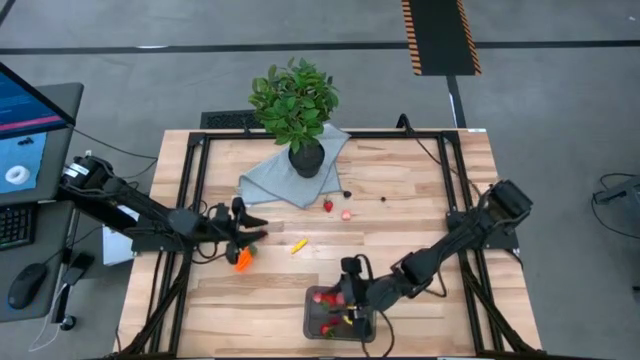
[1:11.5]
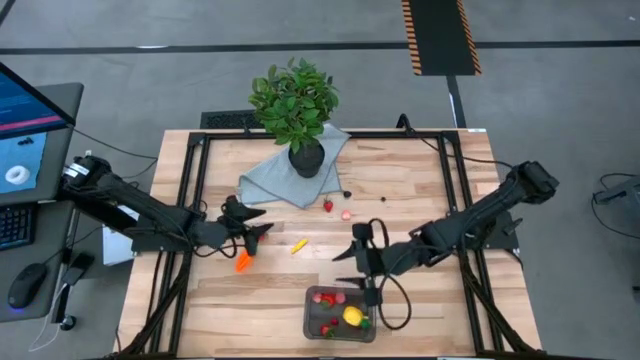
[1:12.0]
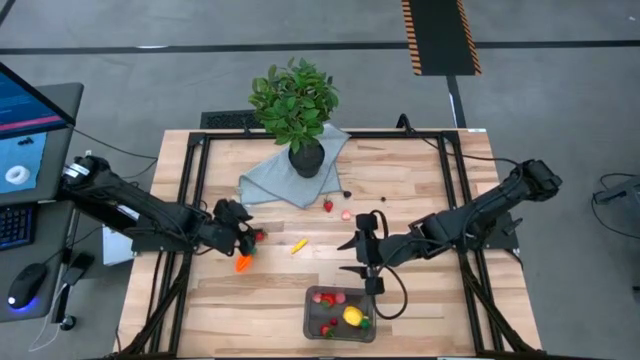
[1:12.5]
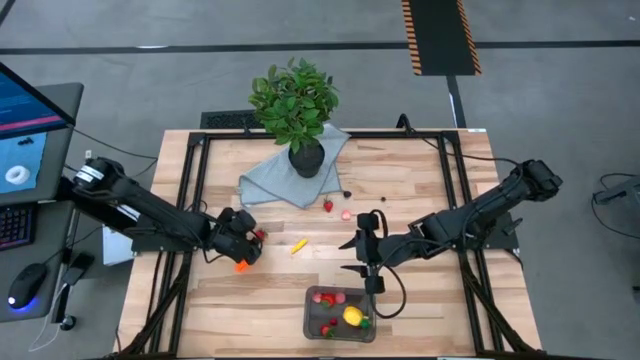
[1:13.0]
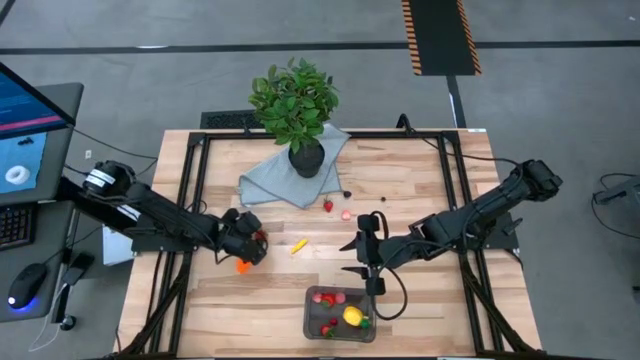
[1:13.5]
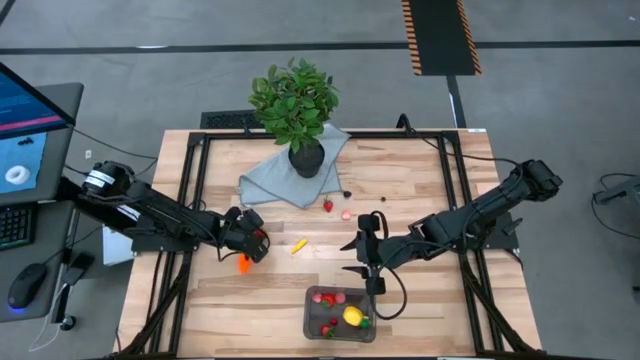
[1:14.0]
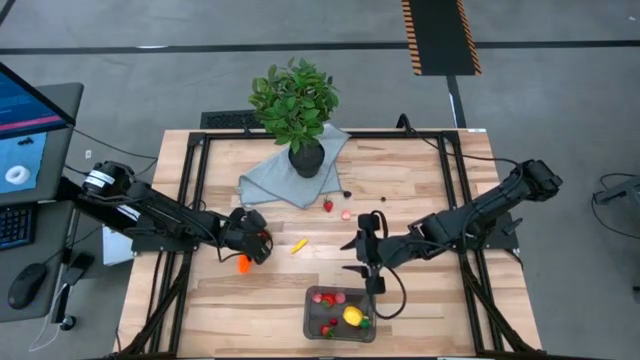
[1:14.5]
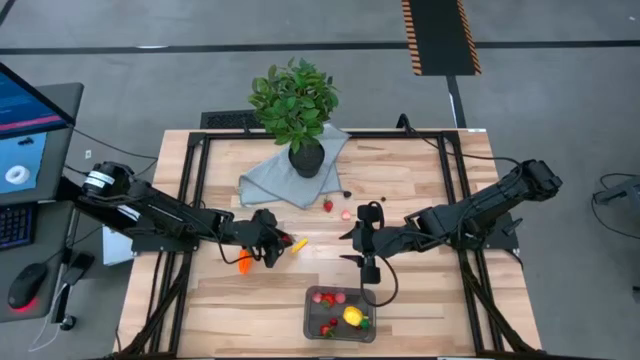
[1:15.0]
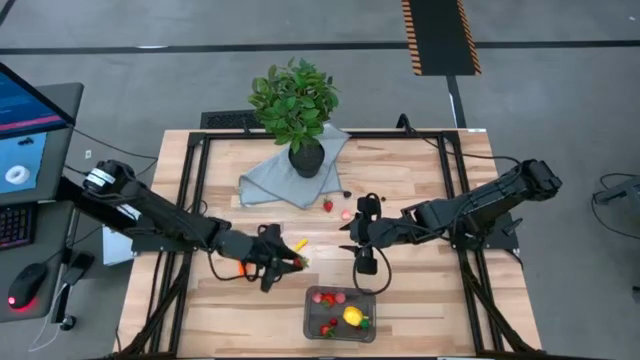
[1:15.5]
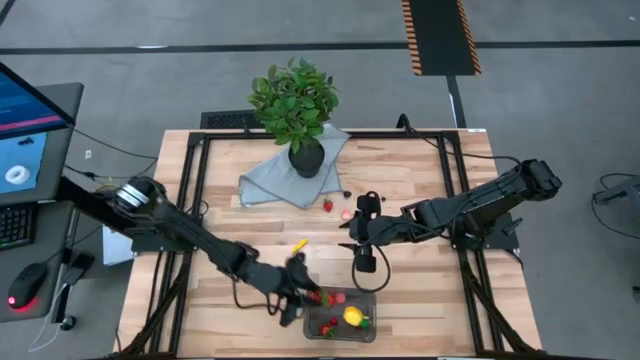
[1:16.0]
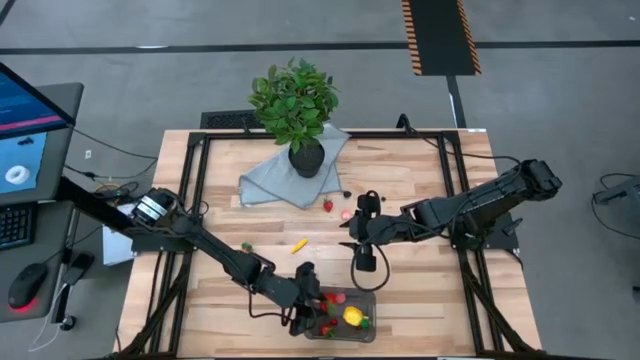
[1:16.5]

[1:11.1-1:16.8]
Task: Pick and placing Produce into tupperware
Put the red strawberry into the black bin

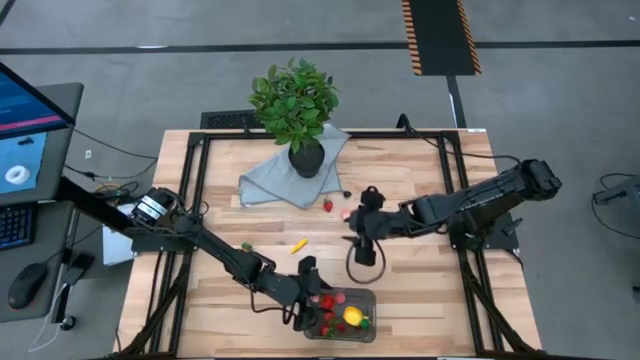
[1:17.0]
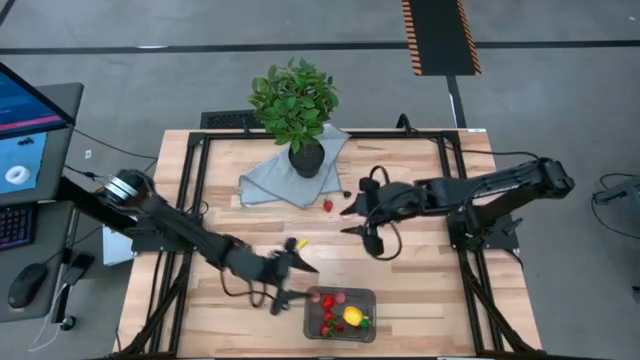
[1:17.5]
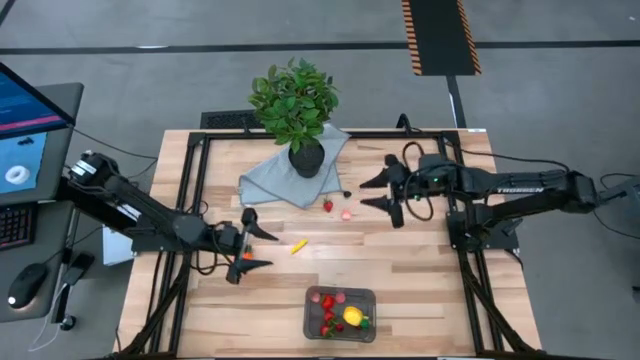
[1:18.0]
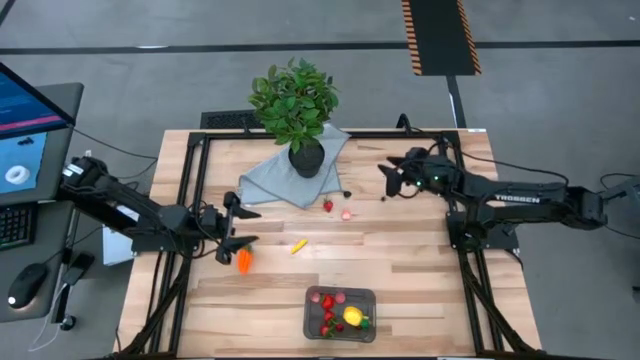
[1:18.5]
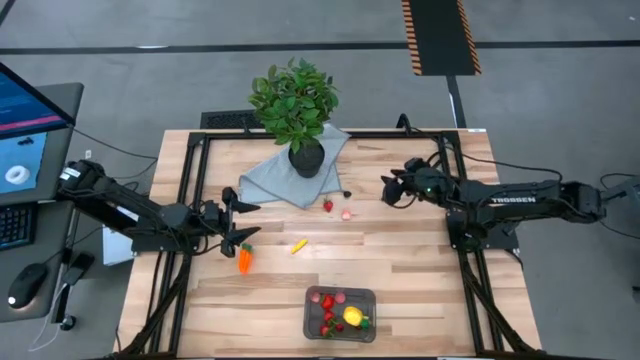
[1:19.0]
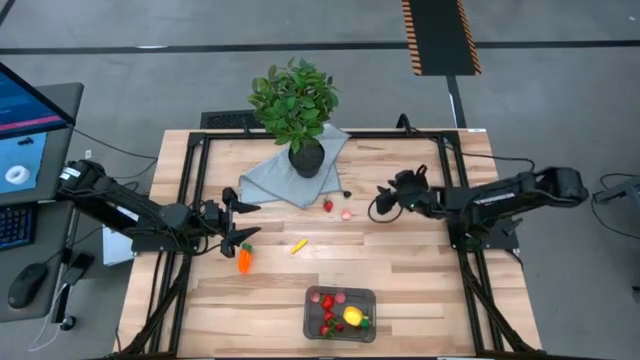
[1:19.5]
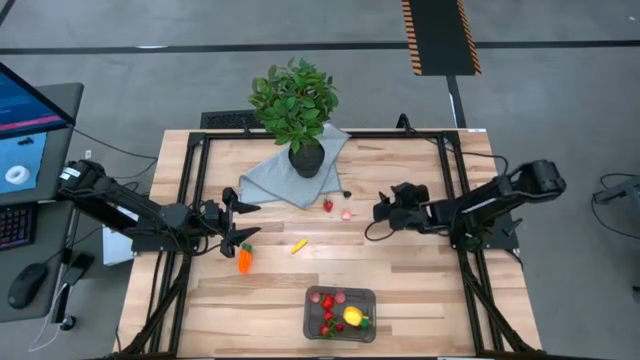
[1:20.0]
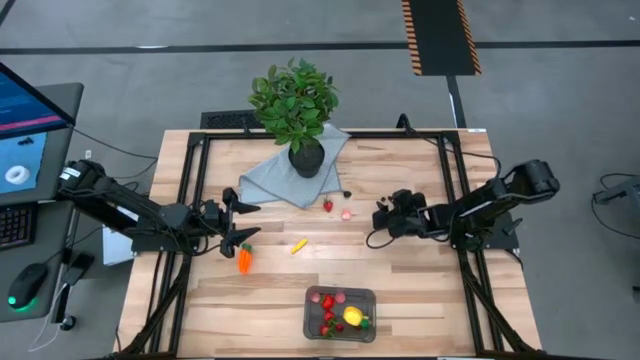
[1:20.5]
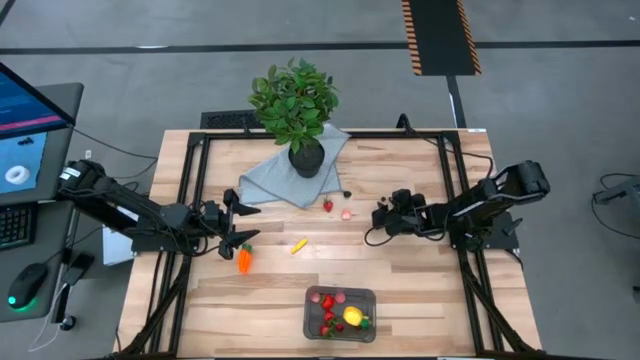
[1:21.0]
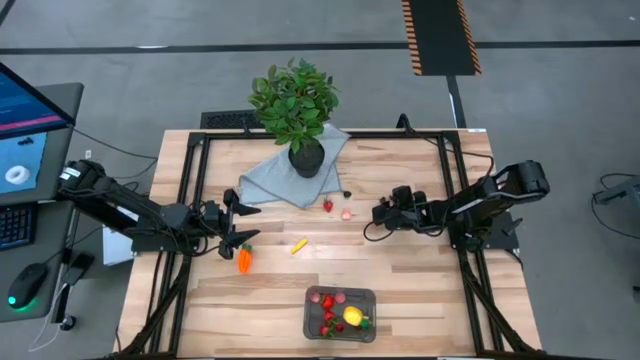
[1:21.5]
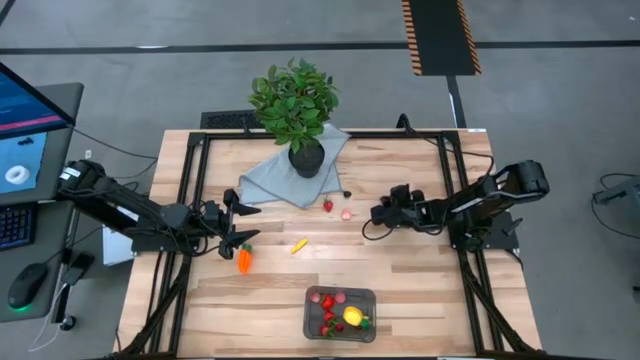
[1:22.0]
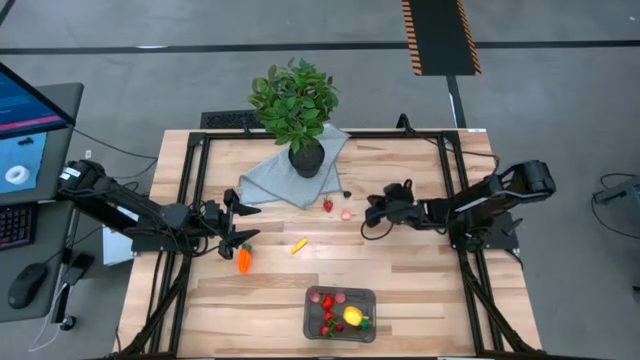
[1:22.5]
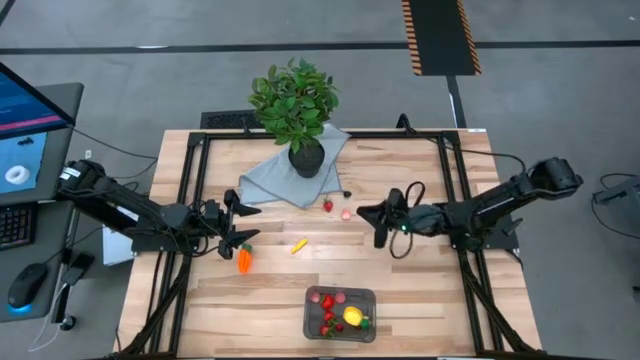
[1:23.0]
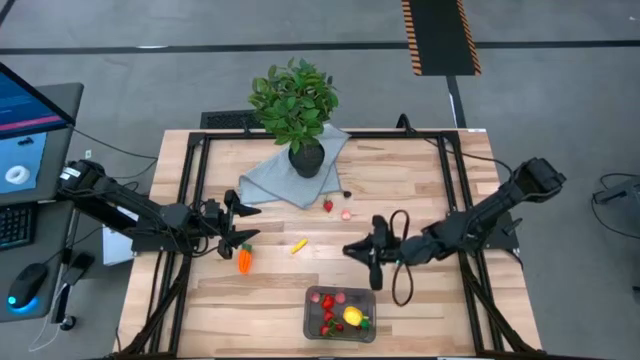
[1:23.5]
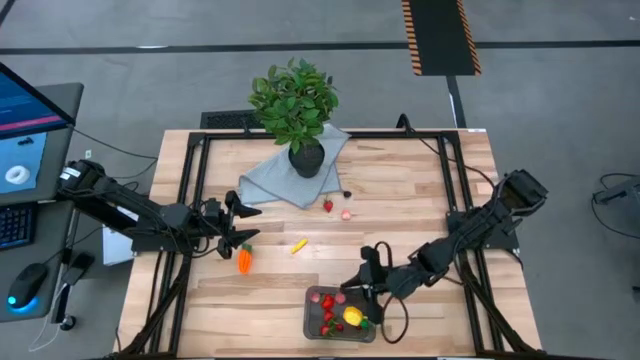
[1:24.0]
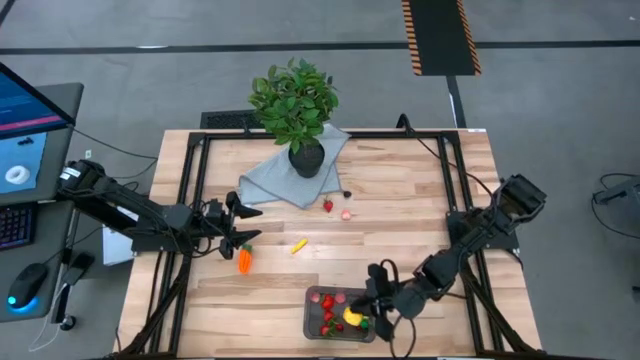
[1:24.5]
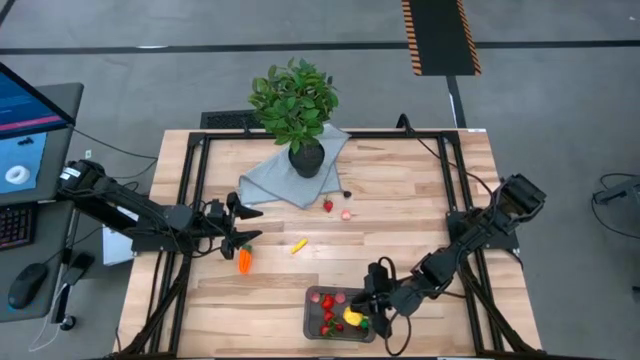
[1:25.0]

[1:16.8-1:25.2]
Put the blueberry into the black bin

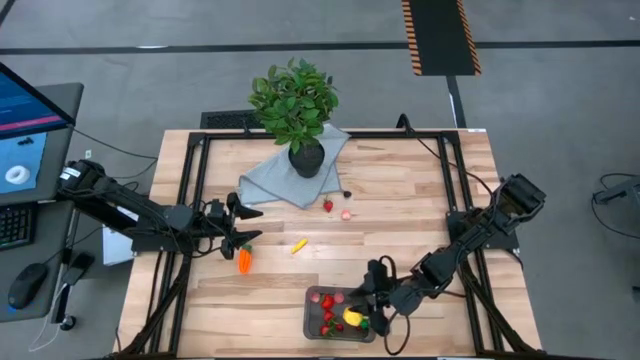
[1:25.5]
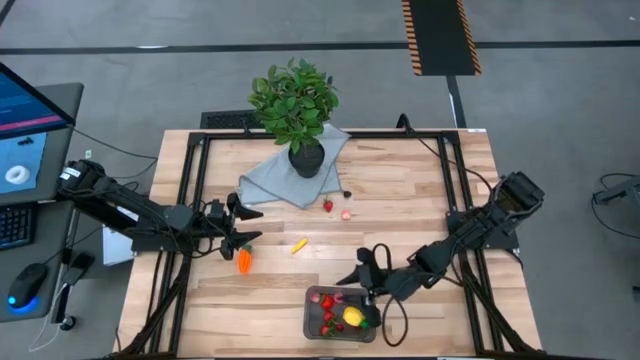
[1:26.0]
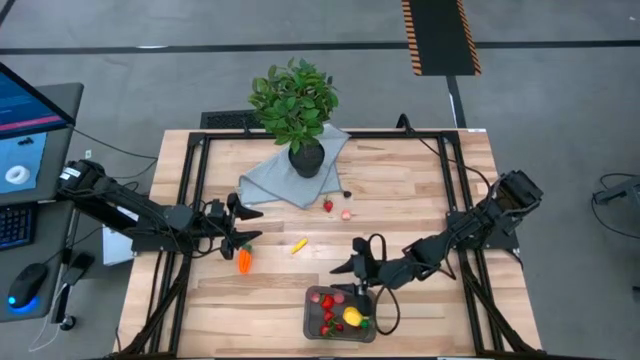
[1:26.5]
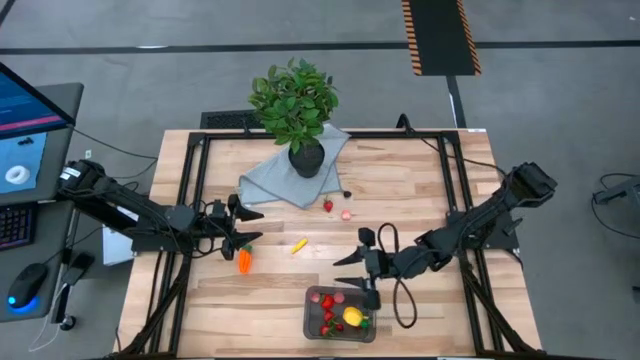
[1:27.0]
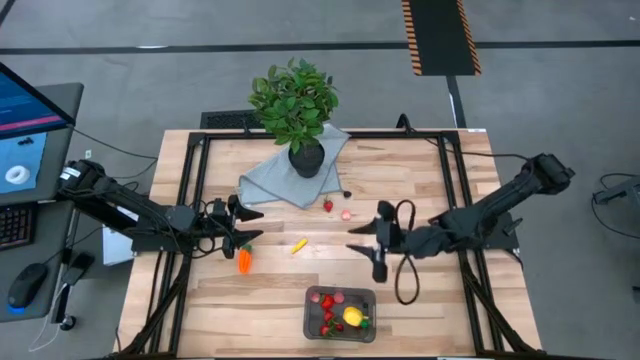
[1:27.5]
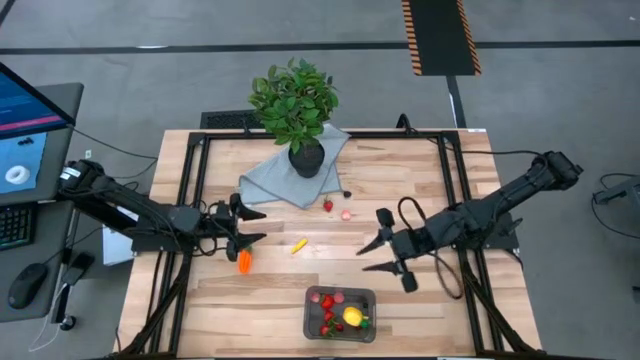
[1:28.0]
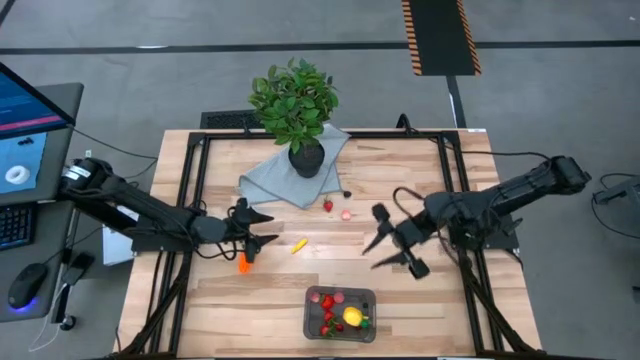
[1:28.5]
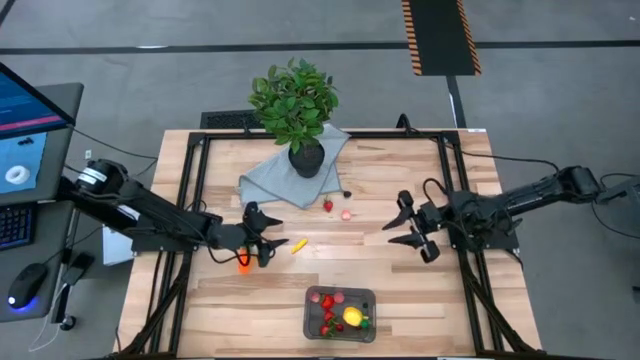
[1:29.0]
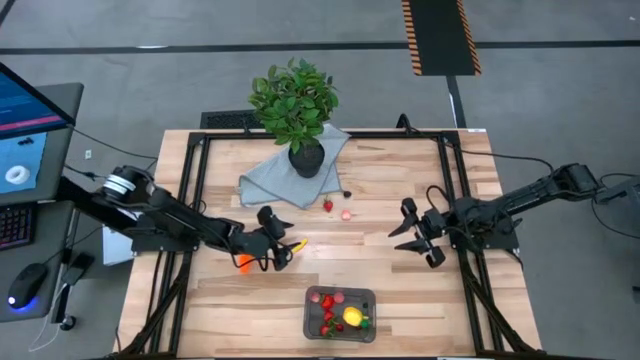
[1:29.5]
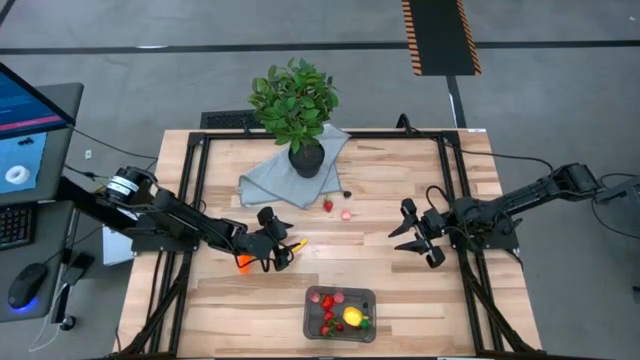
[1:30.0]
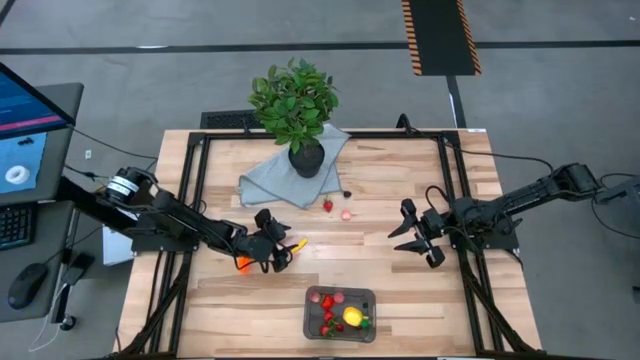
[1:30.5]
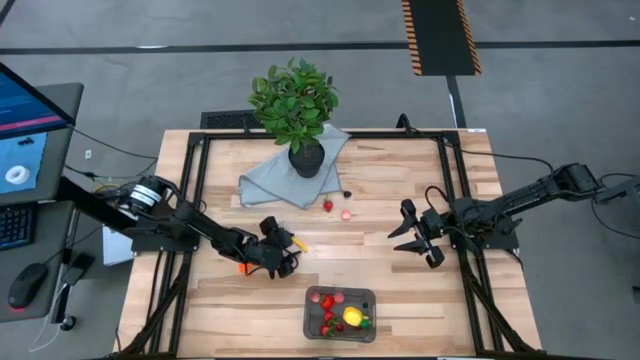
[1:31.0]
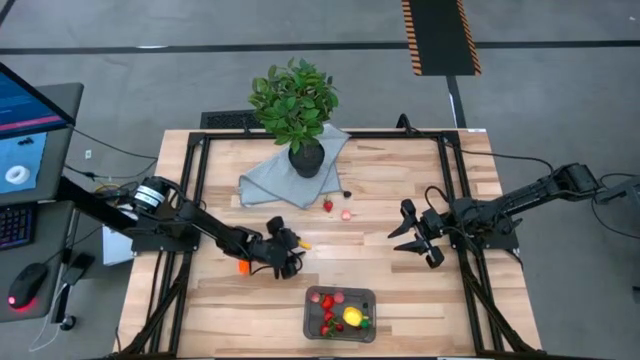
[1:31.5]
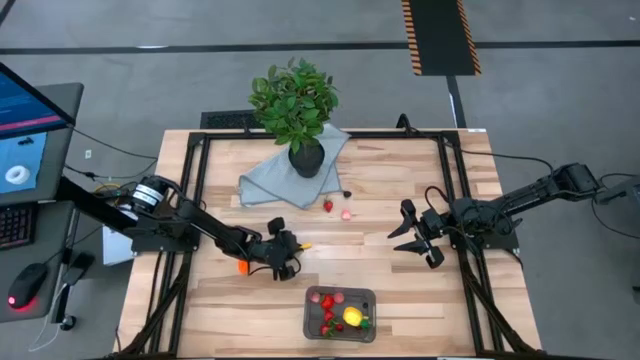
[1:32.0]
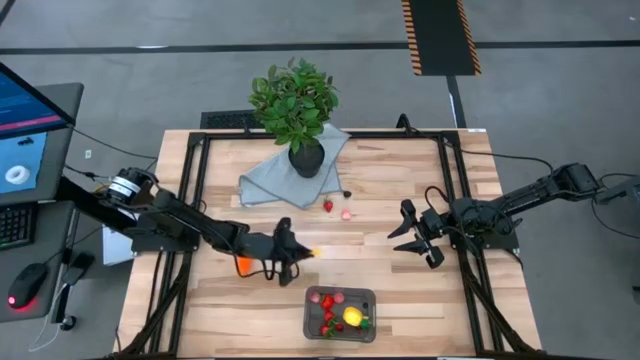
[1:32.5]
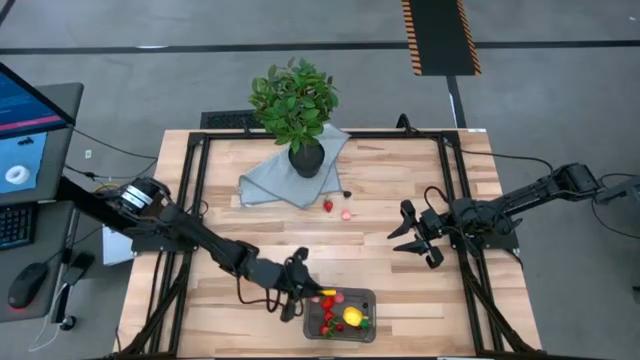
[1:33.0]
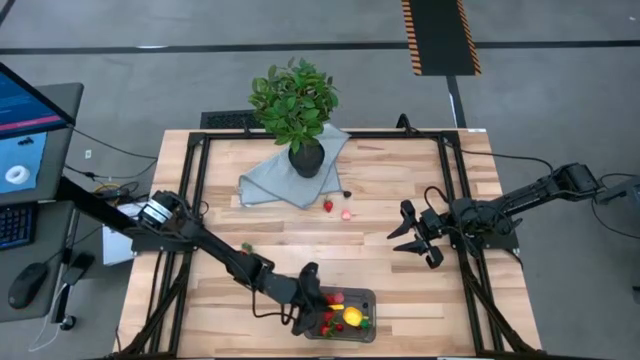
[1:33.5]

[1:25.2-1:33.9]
Put the yellow corn into the black bin
